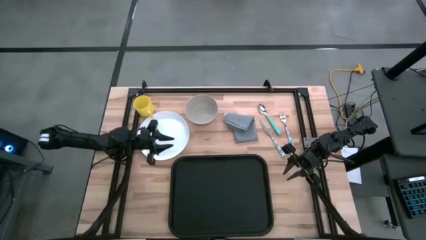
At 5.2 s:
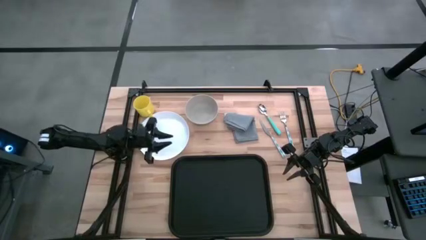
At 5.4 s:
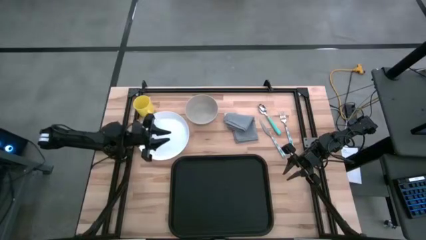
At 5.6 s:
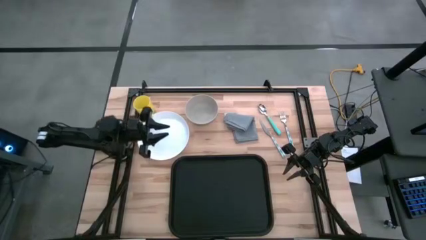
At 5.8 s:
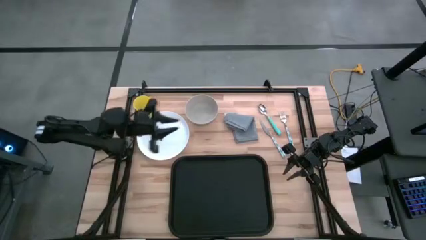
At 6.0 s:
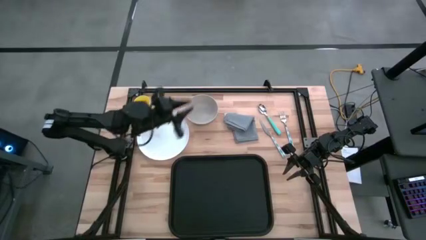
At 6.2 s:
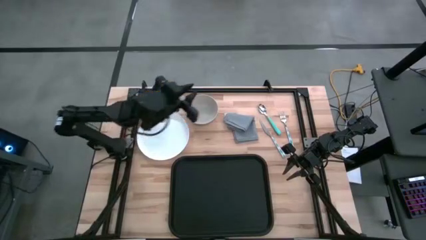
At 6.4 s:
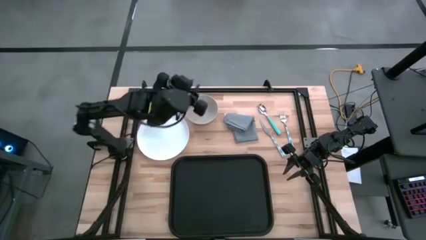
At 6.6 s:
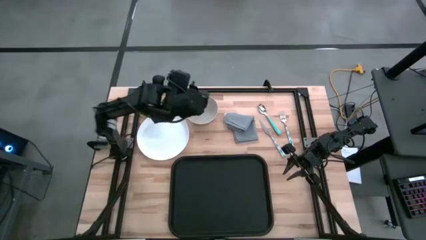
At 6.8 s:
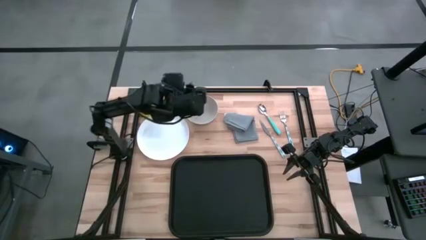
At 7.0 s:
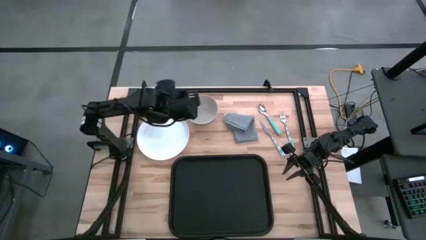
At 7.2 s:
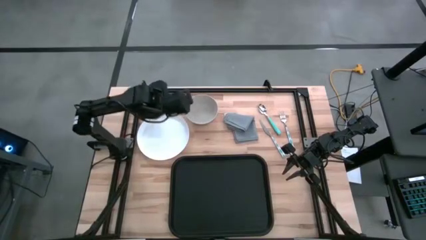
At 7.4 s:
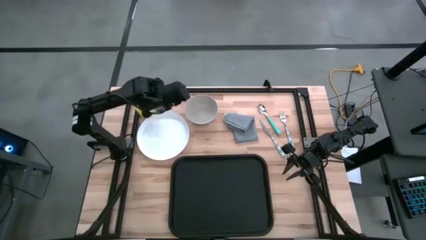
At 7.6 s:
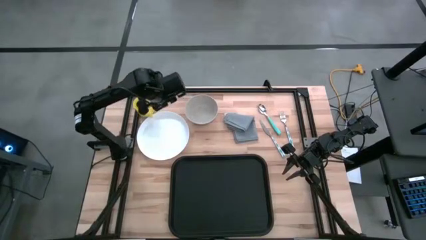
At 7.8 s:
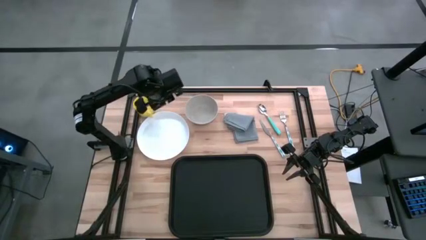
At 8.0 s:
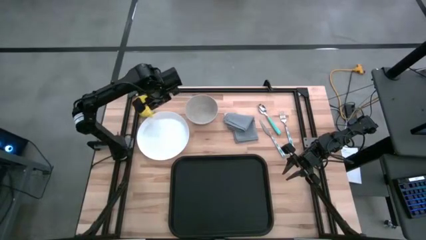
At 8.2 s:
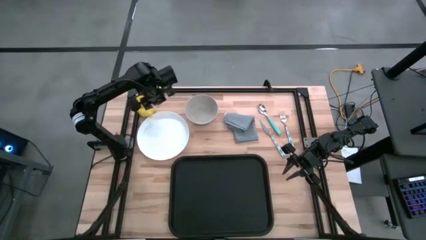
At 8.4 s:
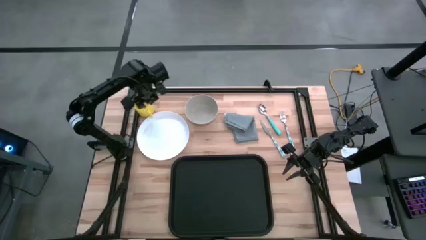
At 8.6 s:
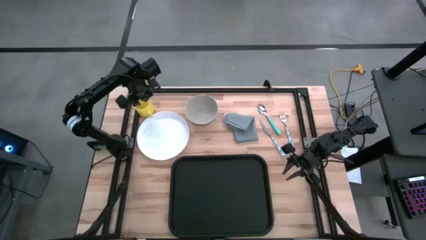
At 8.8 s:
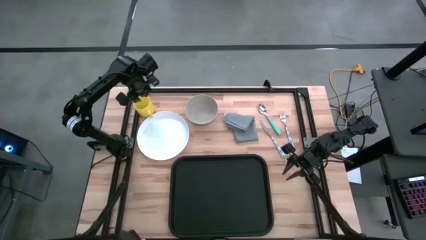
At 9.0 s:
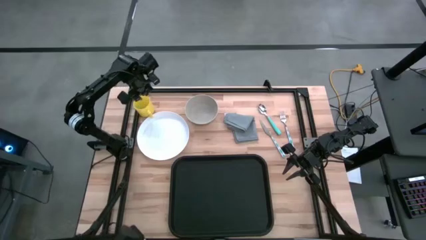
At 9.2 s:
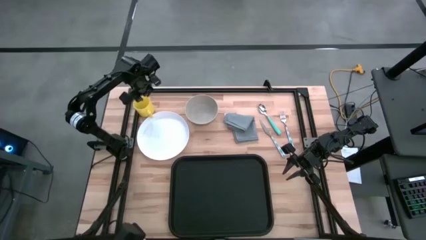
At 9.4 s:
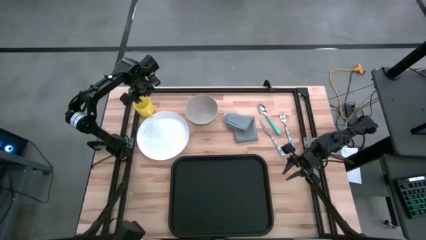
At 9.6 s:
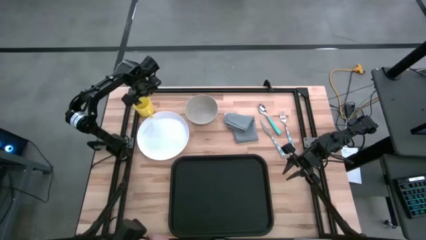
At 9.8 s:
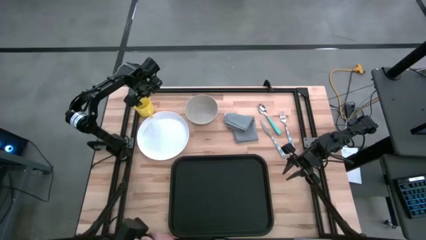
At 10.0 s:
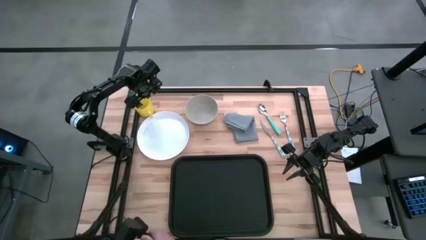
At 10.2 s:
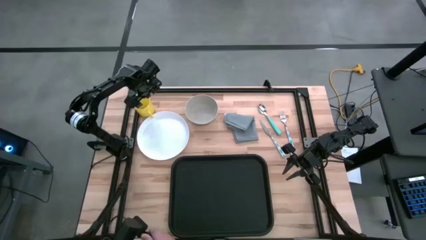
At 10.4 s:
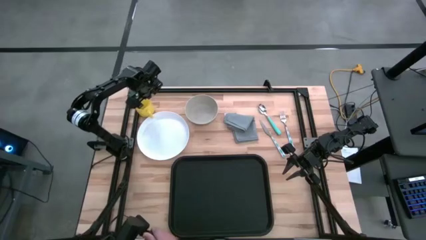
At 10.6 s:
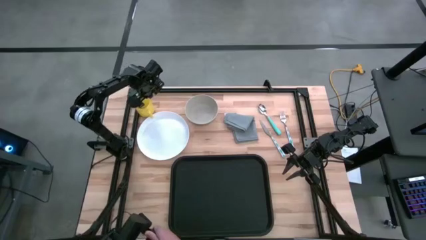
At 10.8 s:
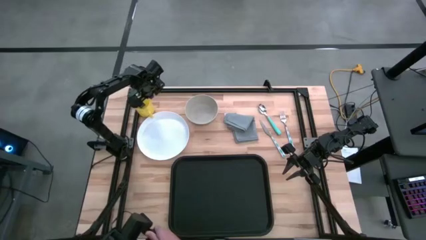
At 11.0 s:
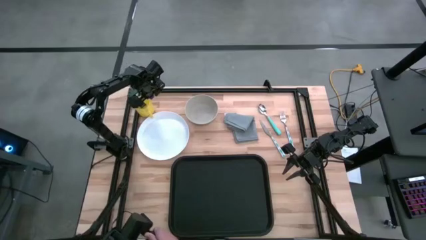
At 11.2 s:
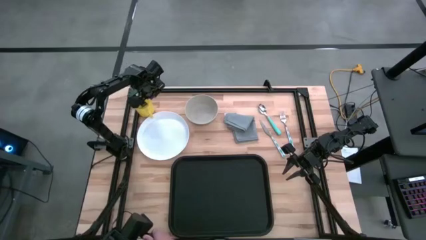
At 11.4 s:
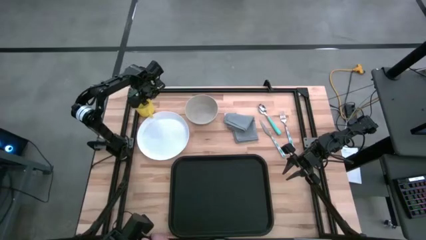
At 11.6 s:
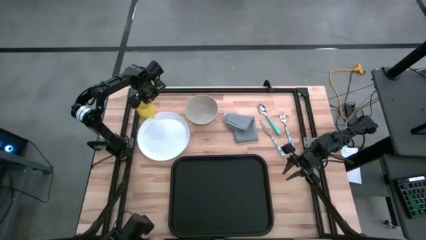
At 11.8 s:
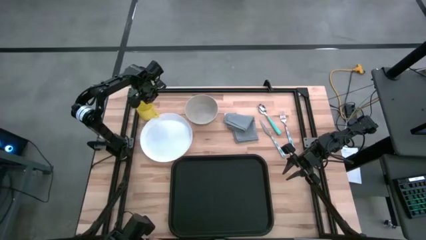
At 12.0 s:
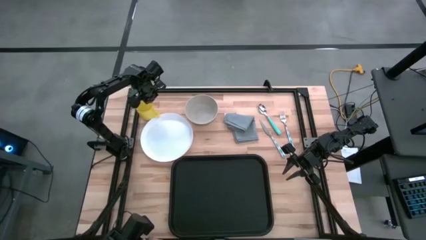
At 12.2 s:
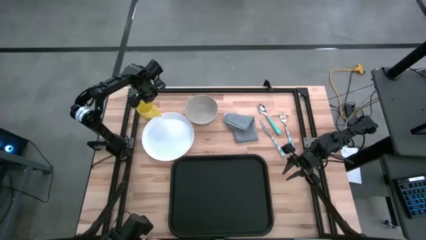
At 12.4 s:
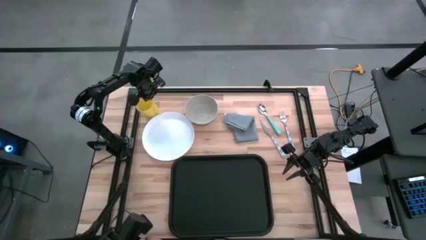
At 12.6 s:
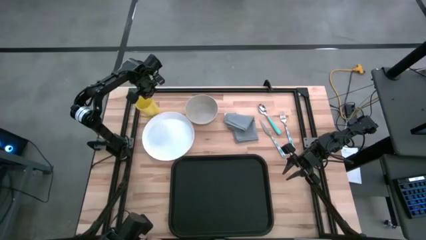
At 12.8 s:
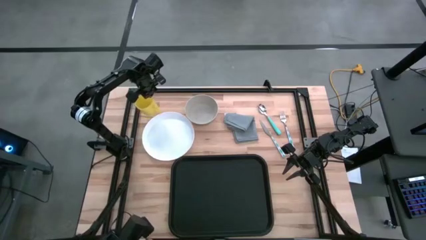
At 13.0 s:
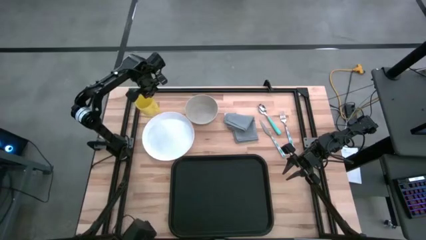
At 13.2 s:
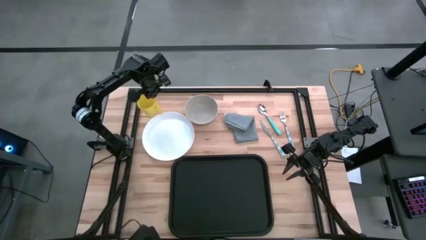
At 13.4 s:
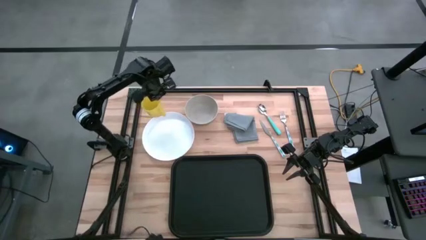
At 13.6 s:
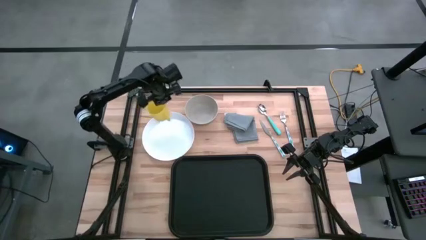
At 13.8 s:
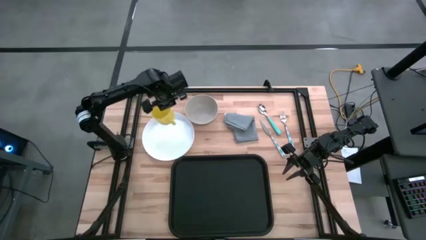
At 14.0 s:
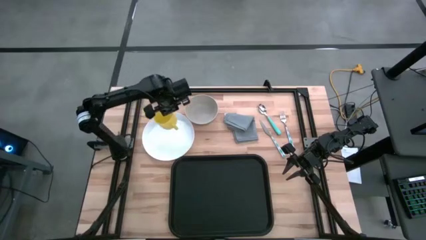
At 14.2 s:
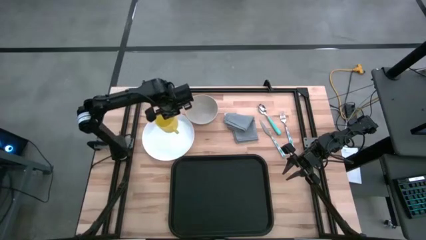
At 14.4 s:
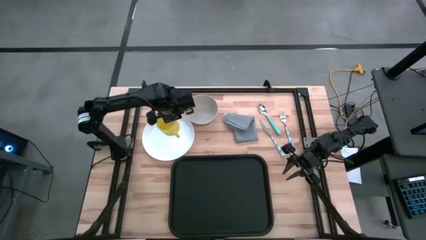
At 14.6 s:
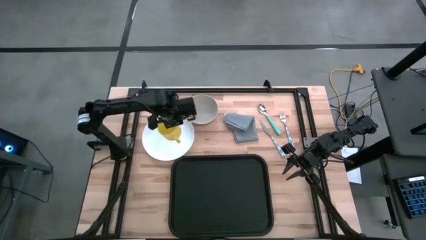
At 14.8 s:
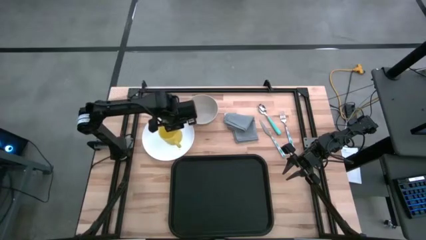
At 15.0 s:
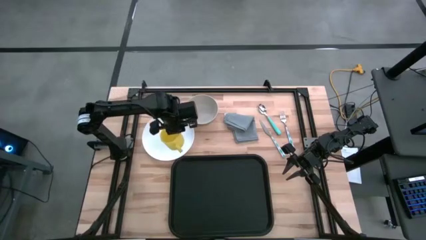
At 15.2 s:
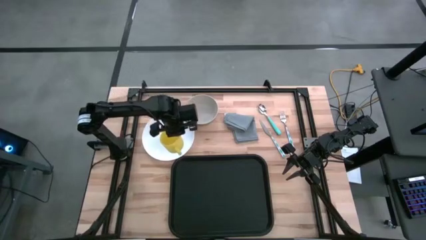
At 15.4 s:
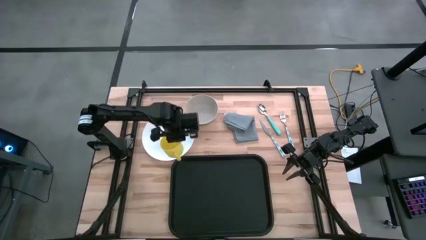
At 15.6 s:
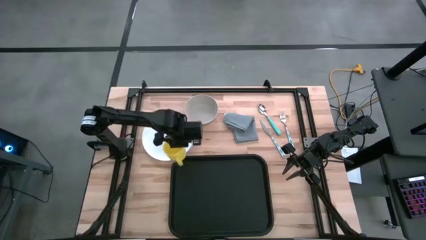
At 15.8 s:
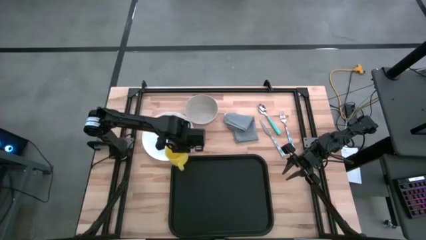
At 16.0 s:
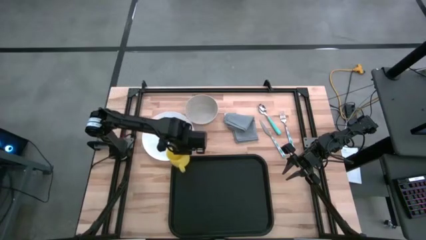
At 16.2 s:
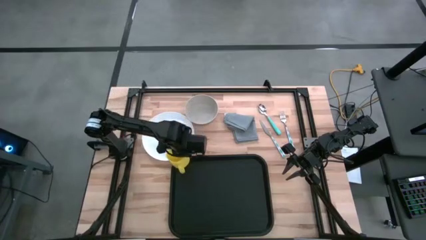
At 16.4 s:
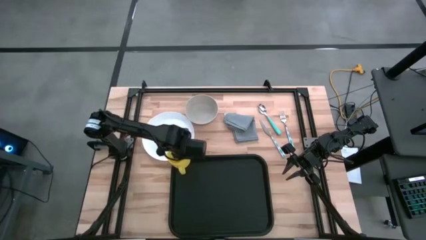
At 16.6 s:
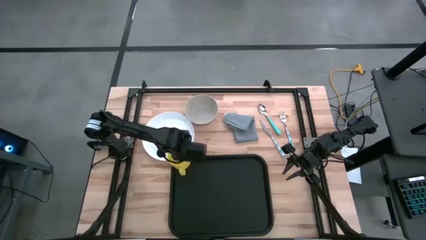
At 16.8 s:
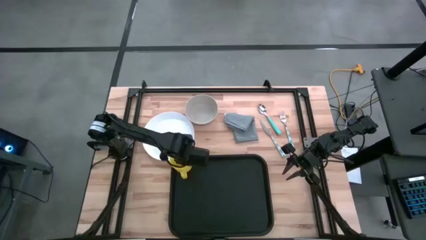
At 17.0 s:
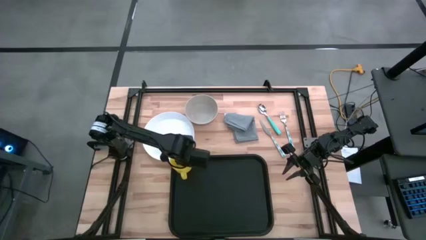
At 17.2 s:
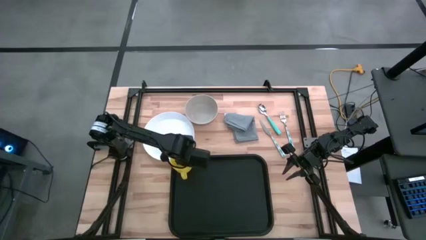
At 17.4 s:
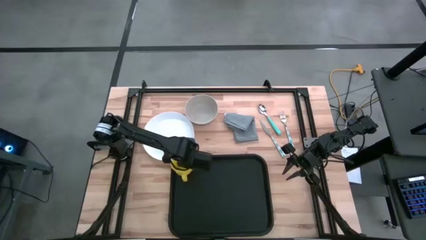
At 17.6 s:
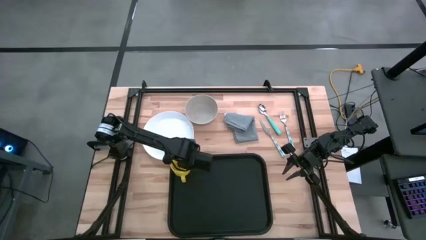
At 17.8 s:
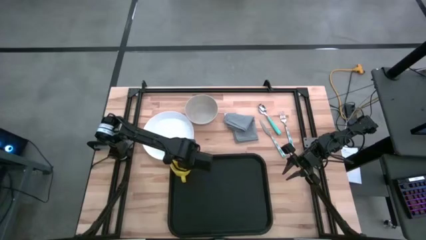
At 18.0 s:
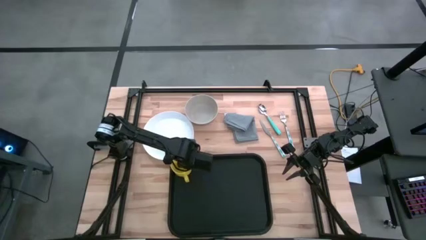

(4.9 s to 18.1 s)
Task: Set up tray
Put the yellow mug on the black serving tray

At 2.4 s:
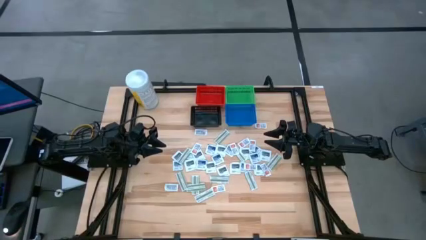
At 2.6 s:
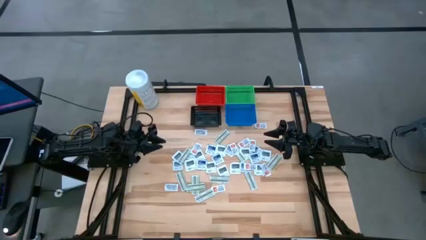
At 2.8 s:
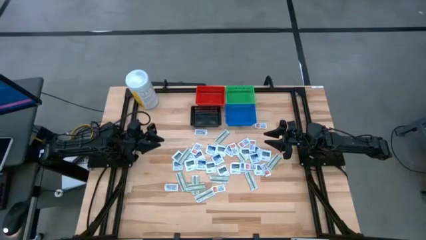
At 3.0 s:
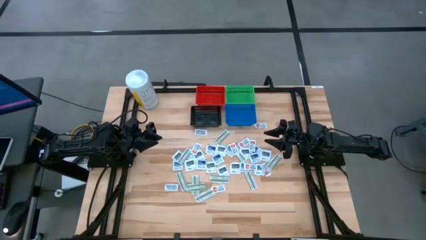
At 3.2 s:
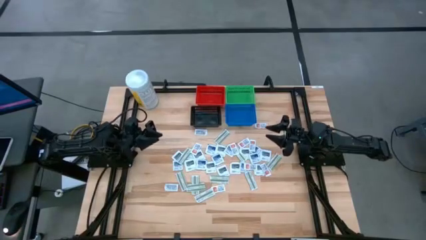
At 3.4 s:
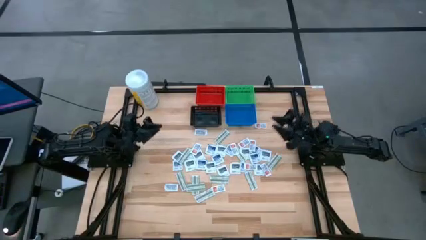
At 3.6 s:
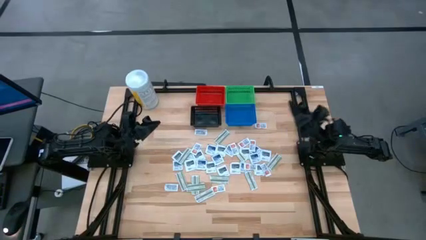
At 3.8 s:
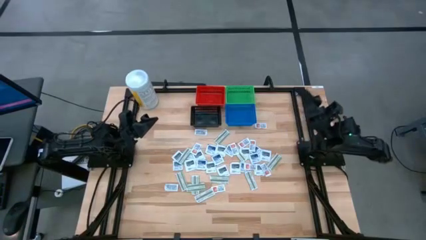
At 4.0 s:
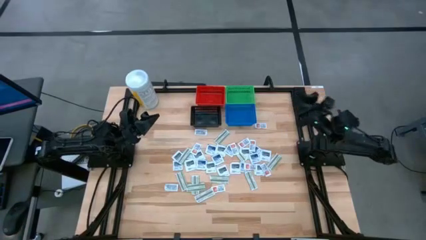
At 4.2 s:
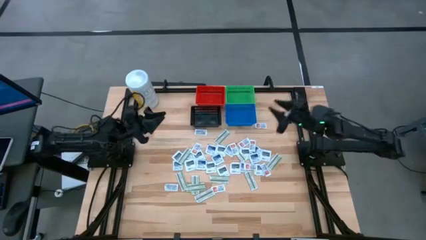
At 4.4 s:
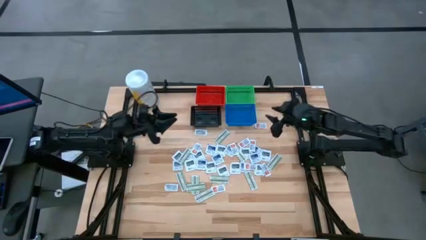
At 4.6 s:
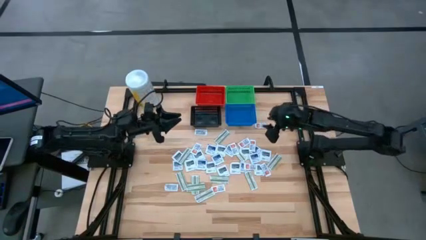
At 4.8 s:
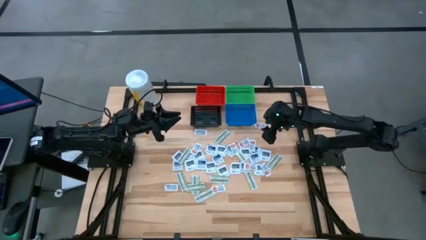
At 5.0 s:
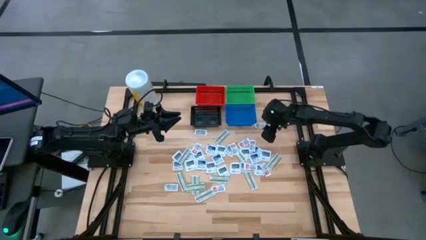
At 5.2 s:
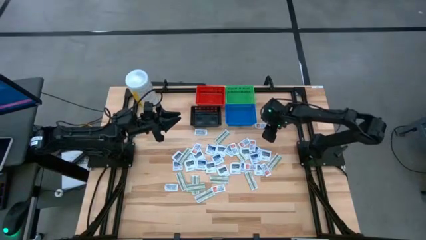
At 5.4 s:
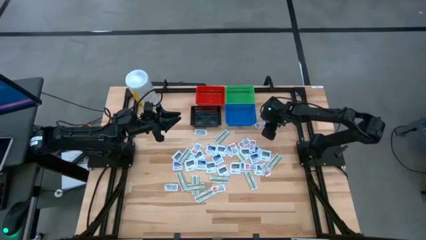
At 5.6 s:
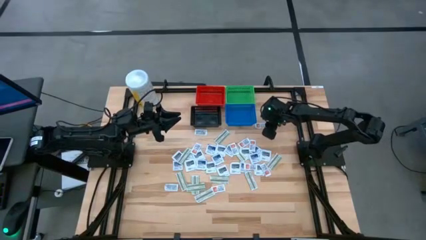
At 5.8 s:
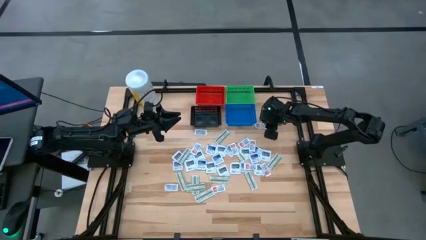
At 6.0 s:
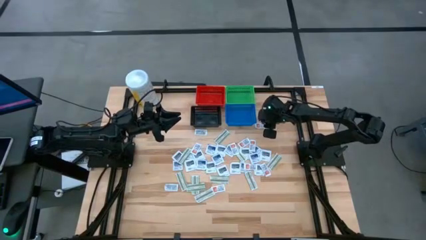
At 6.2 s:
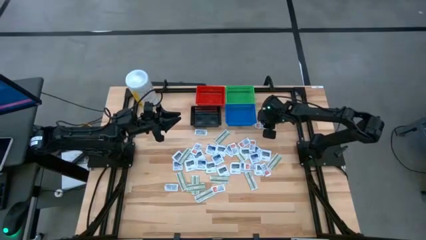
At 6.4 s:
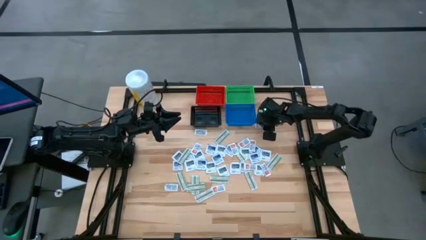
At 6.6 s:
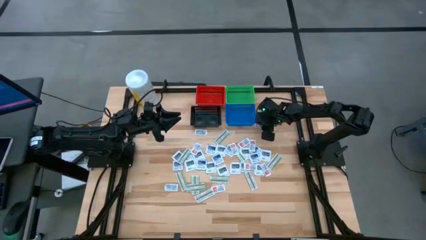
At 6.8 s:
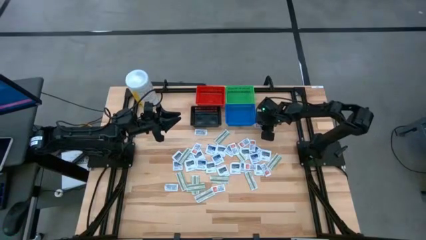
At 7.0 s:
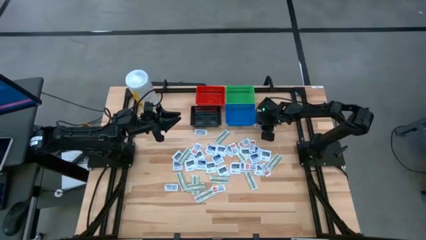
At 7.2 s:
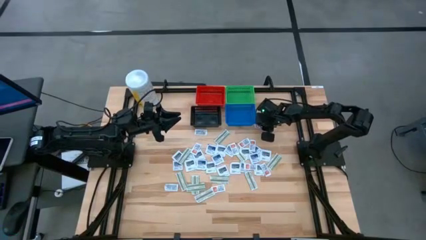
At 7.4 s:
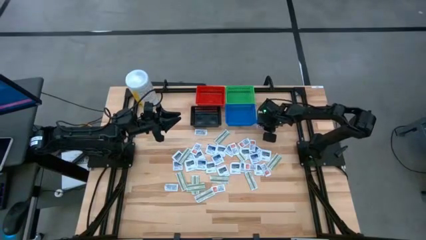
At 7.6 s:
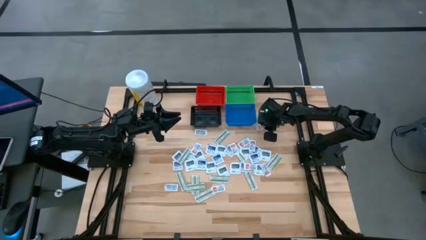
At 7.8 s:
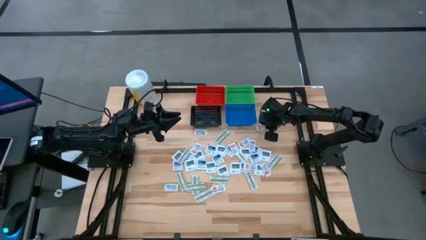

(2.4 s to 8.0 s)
Task: Pick & Place First Aid Supplies
Put the ointment pack into the green basket
